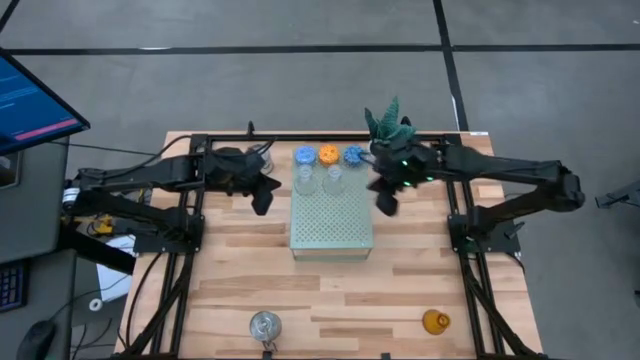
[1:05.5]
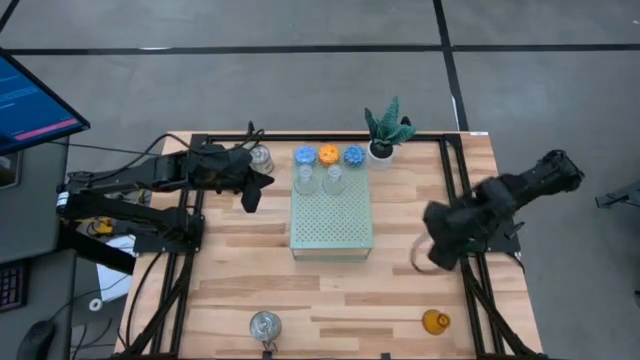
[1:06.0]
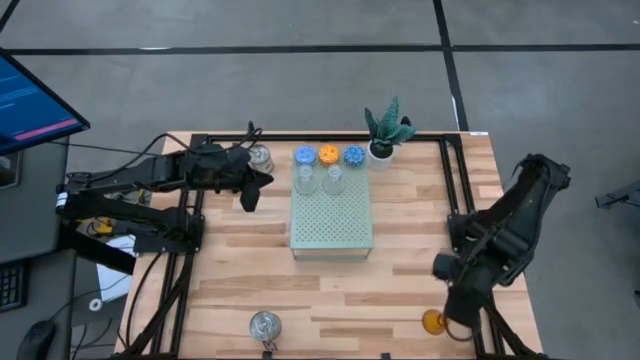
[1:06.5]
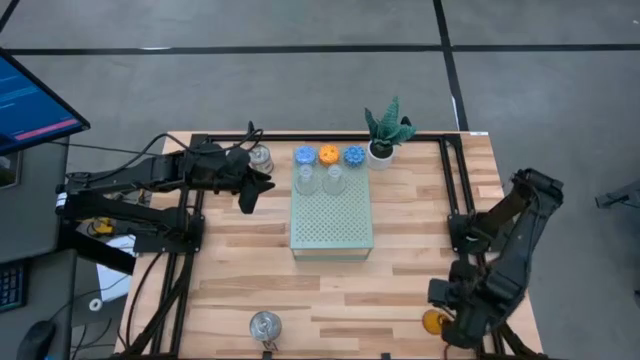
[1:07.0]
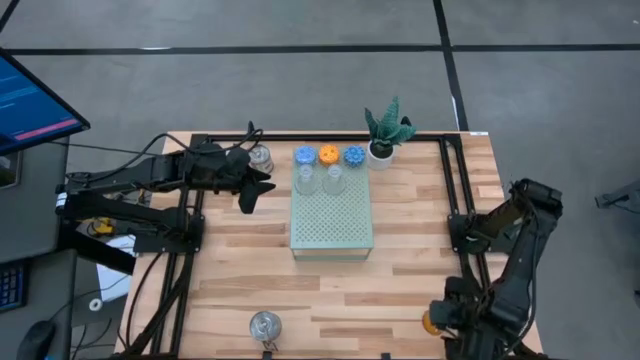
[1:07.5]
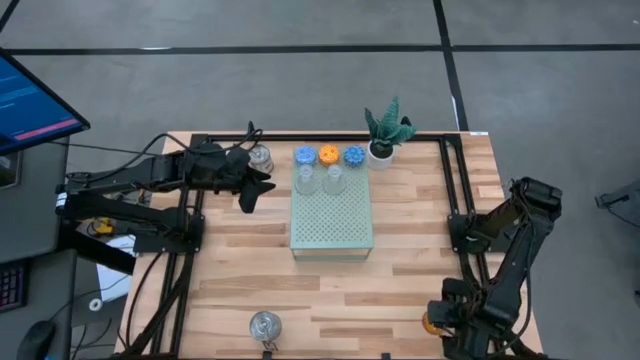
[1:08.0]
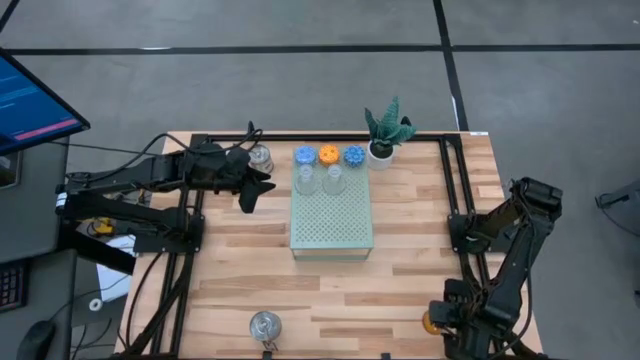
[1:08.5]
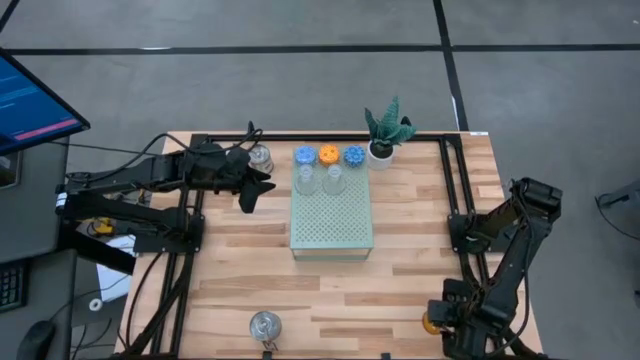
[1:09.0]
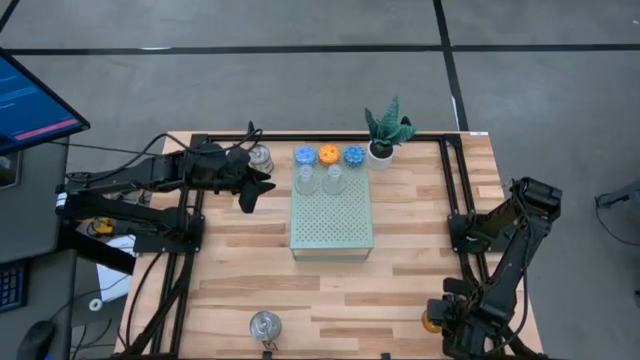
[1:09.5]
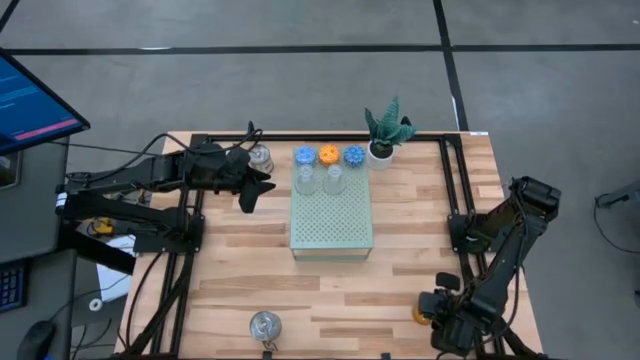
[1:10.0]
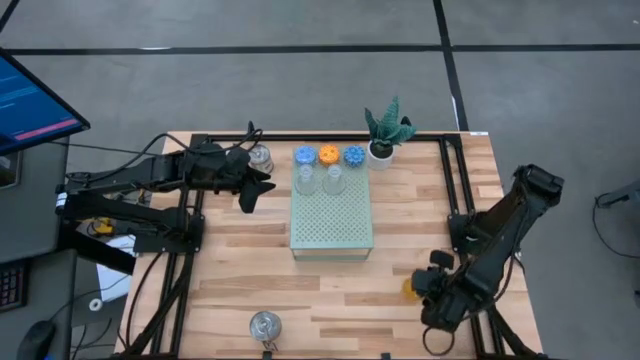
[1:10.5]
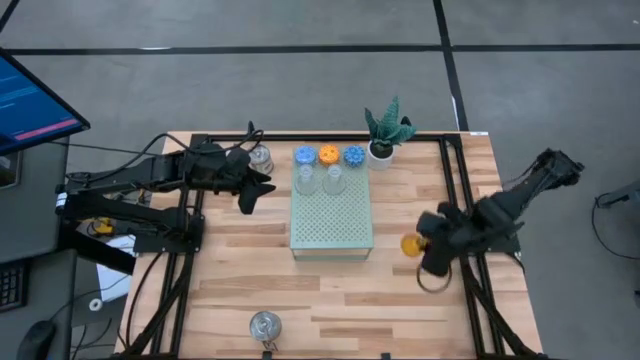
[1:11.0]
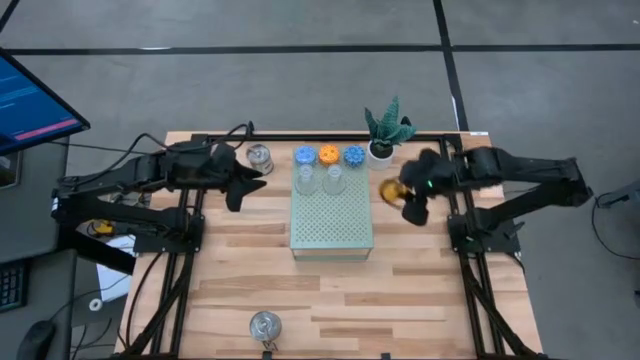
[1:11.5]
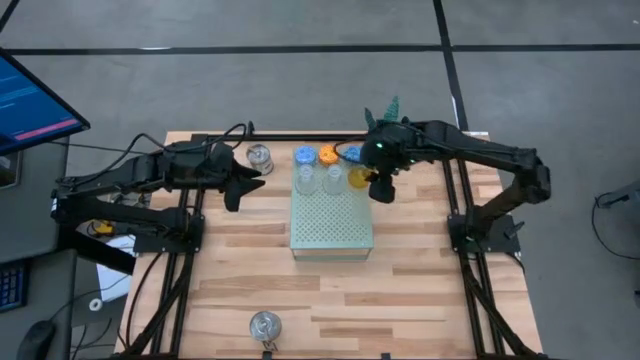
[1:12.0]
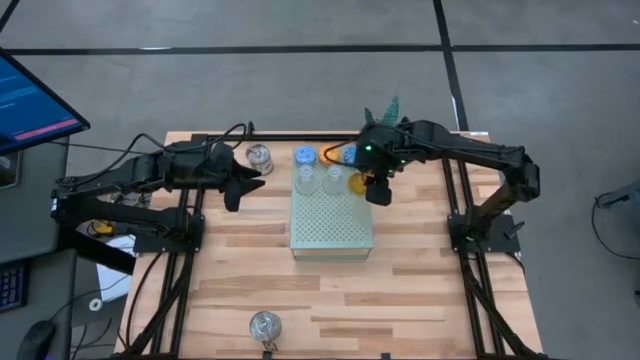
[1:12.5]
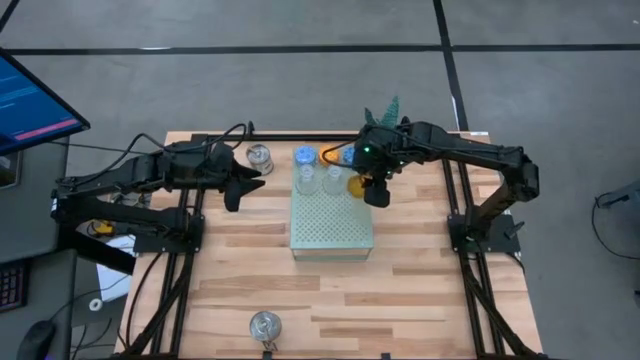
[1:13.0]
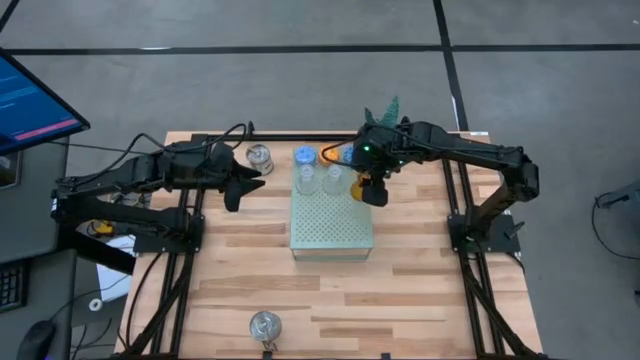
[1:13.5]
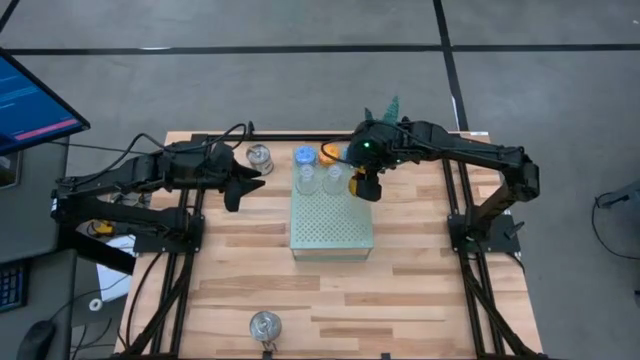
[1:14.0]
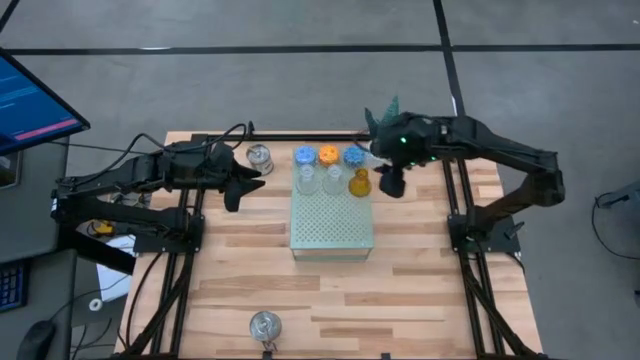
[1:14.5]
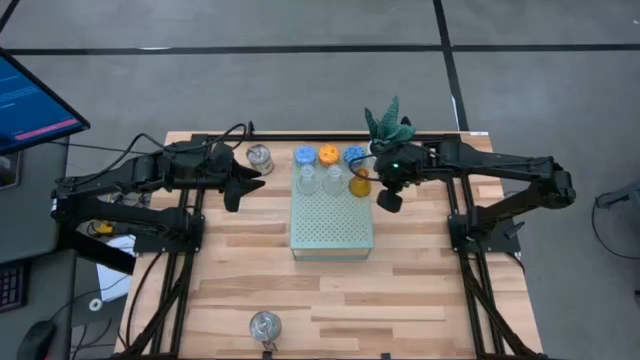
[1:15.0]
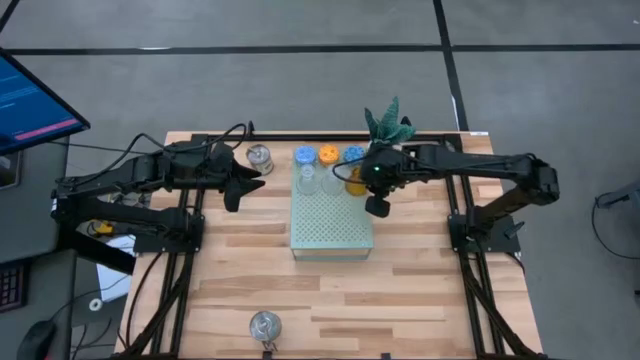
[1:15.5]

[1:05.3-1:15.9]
Task: Stock candles and holders on shelf
Put the yellow candle holder on the shelf aligned with the other candle holders

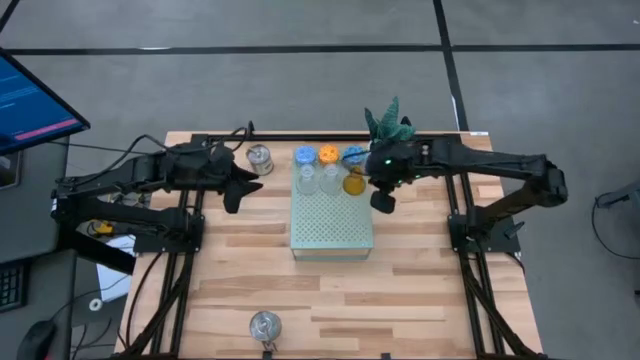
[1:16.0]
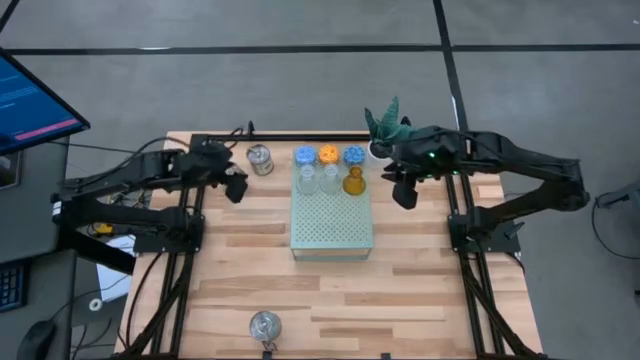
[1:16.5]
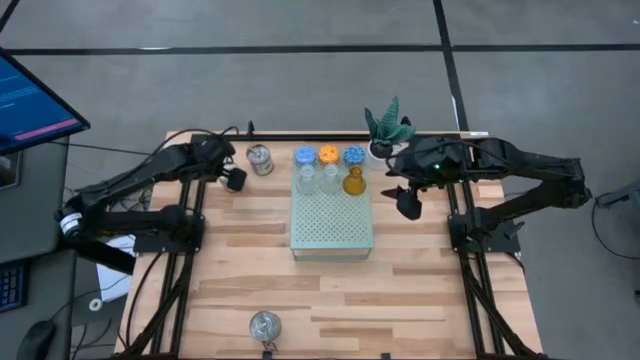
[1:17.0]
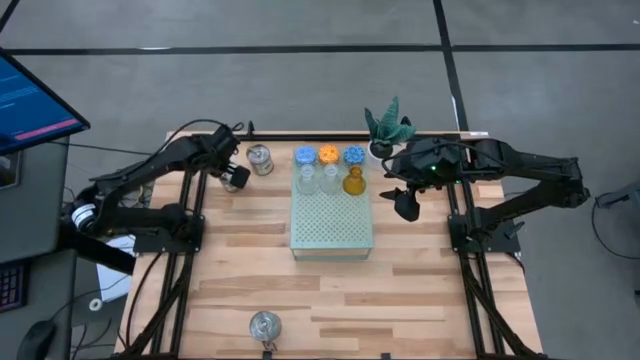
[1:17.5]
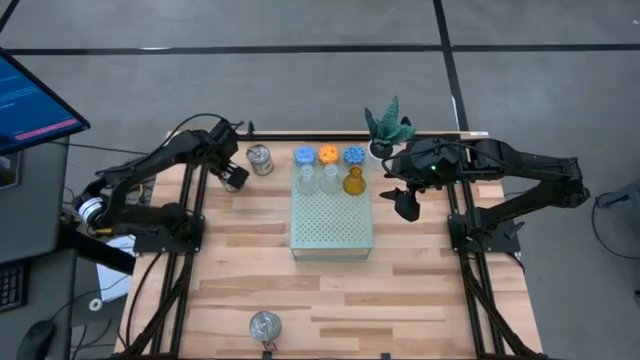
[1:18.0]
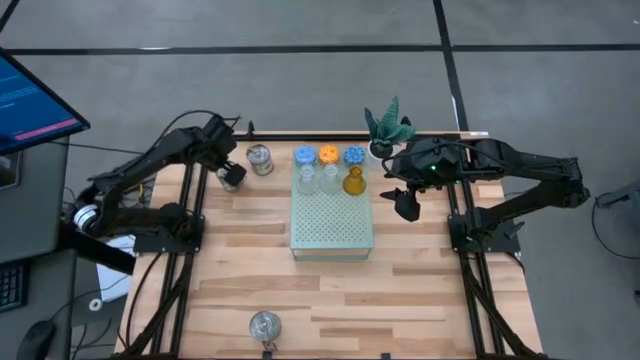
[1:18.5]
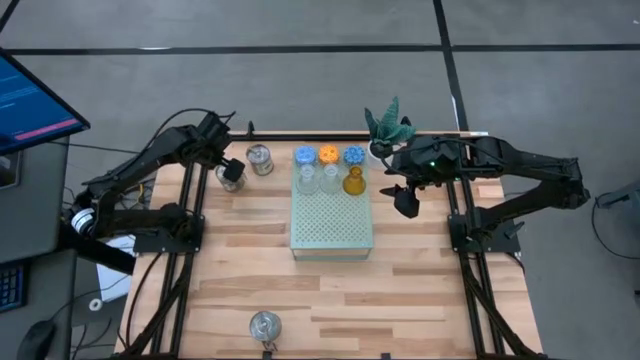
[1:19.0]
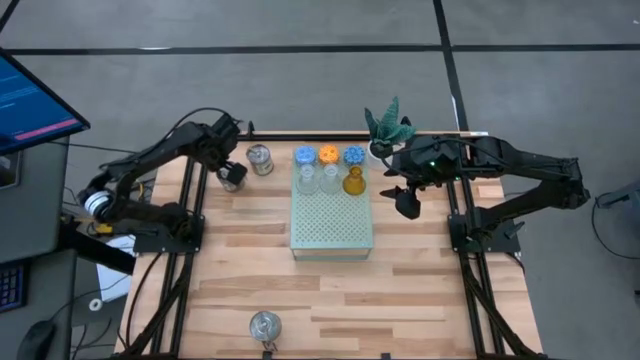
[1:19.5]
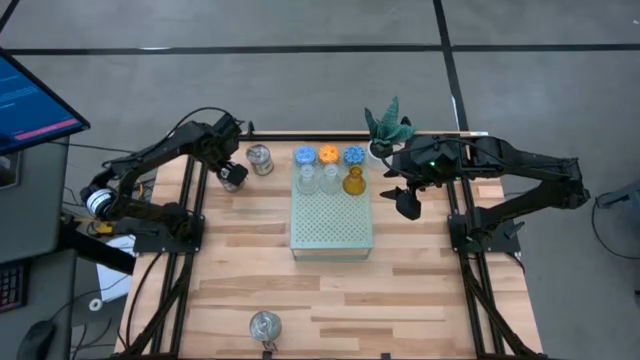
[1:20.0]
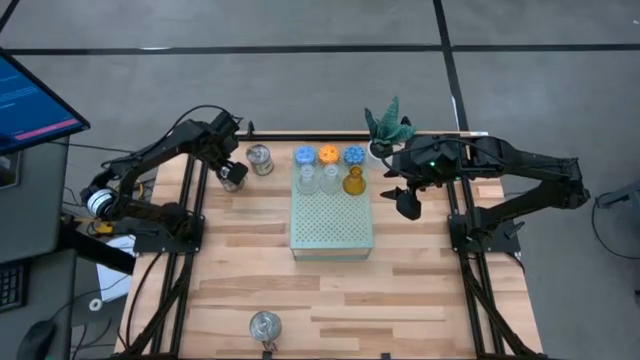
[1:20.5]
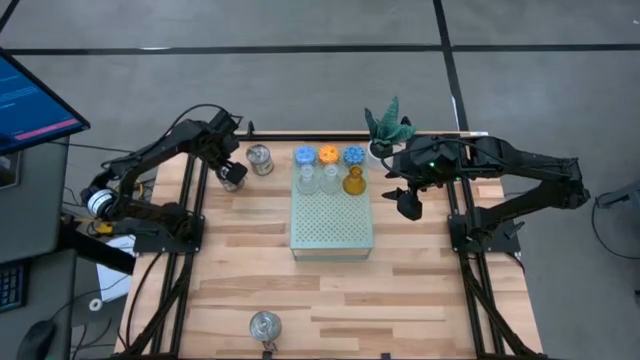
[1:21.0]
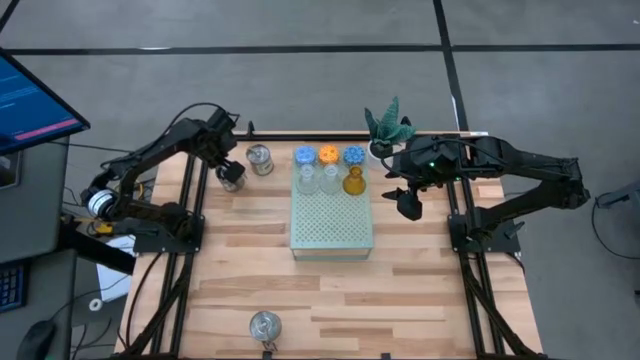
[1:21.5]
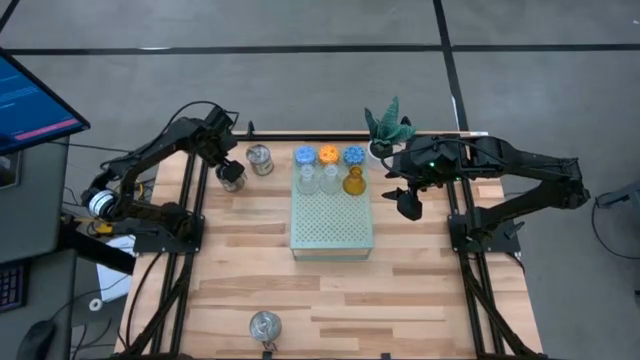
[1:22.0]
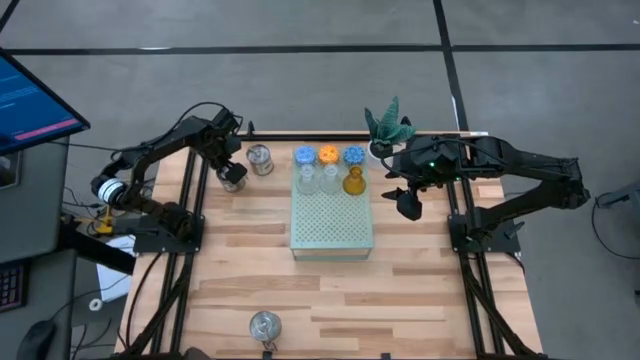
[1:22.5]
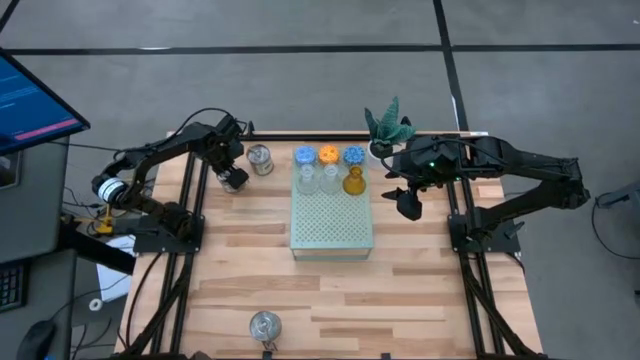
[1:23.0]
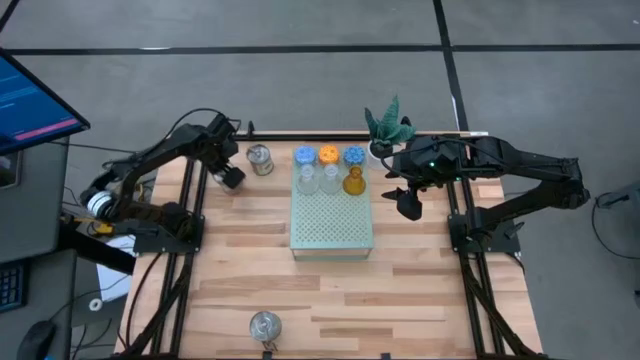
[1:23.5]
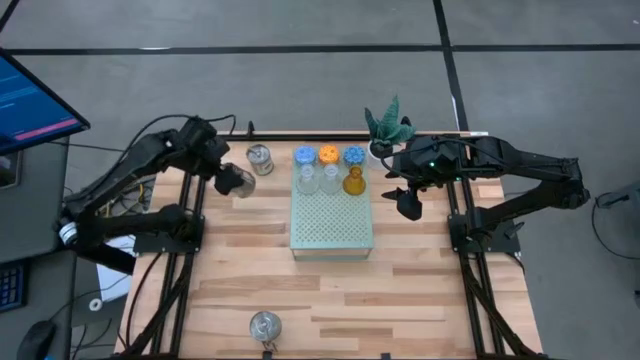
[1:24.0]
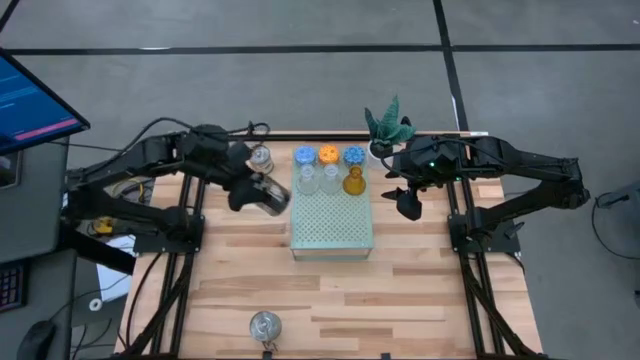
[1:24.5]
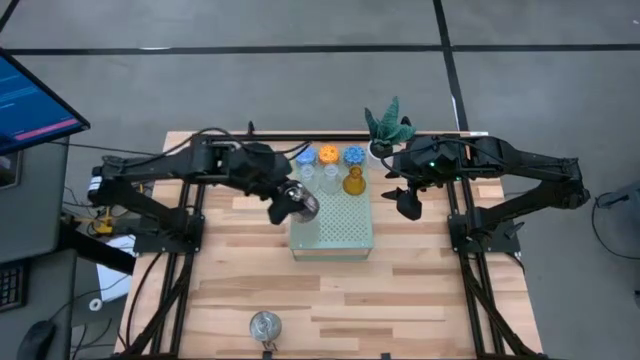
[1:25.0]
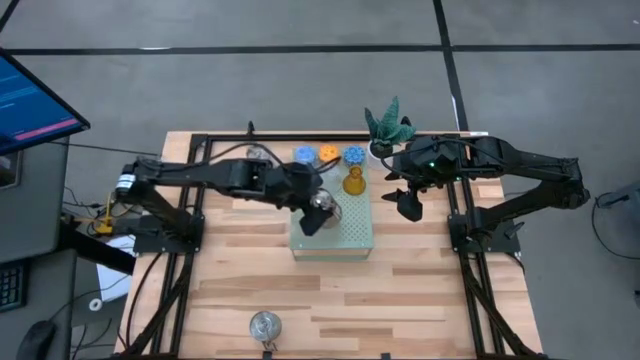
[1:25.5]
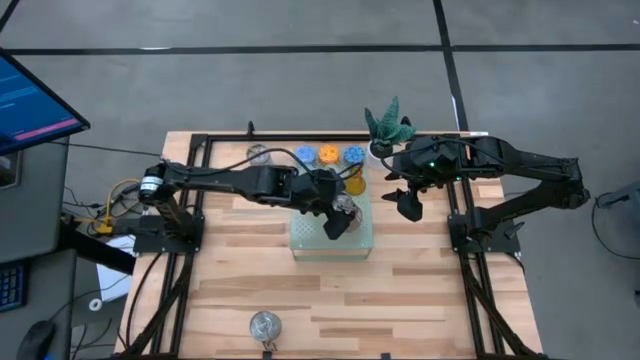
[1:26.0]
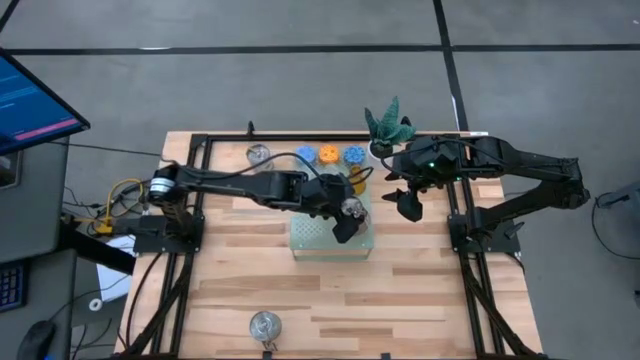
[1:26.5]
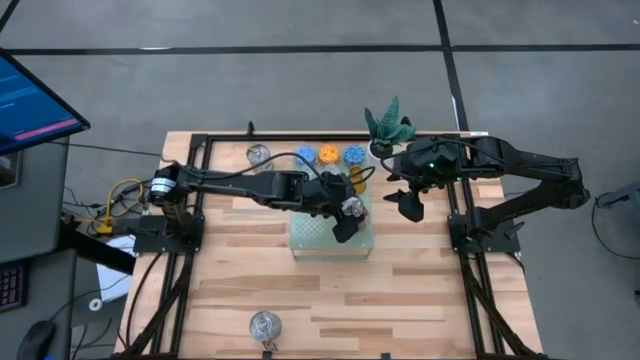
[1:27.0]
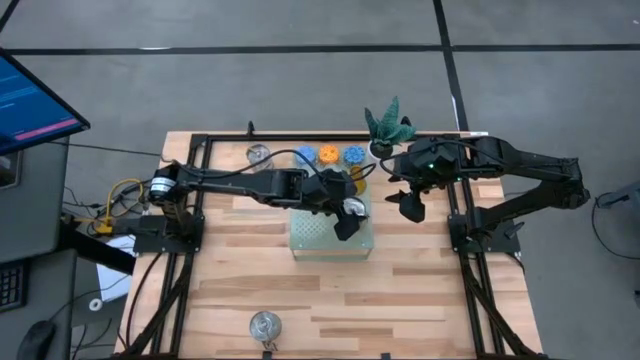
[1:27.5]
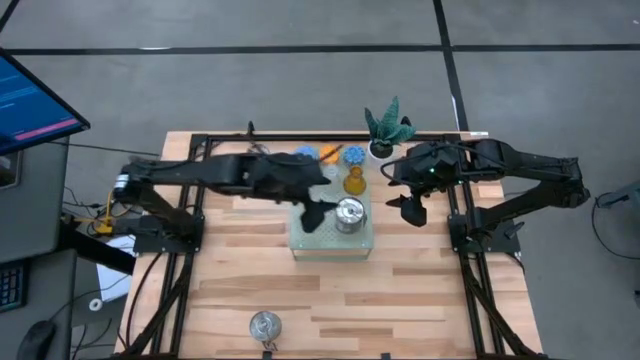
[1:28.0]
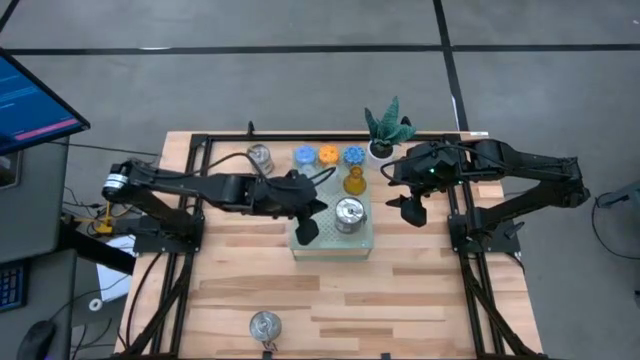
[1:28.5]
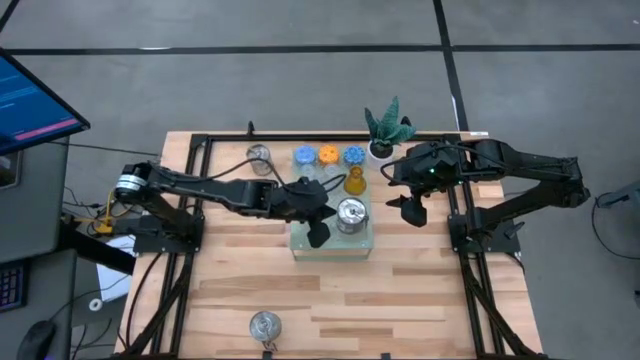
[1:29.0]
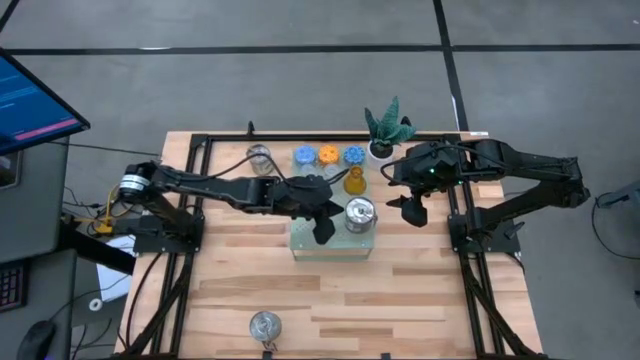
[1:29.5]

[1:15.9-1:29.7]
Put the middle silver scented candle can on the shelf
